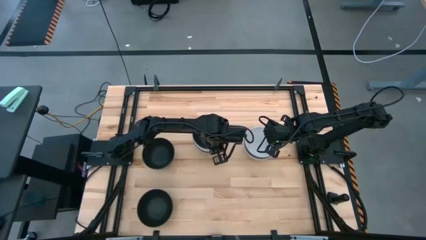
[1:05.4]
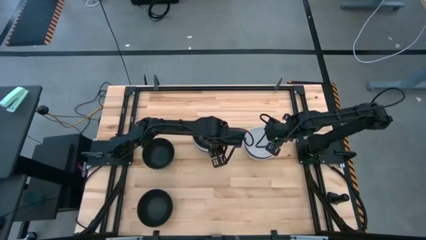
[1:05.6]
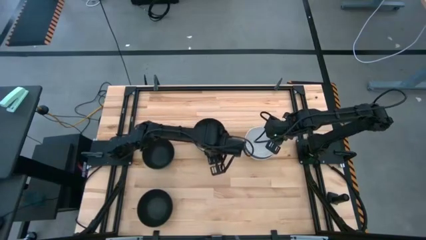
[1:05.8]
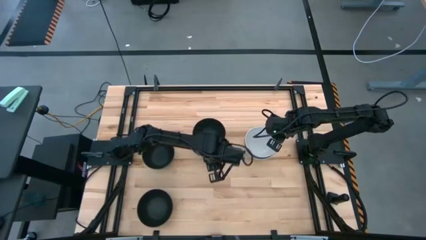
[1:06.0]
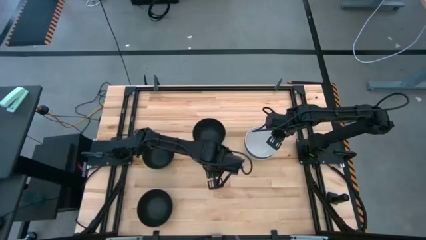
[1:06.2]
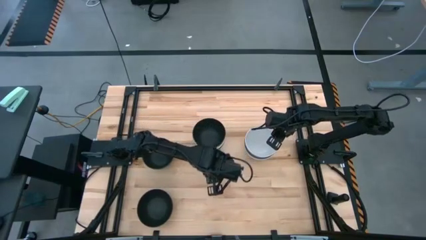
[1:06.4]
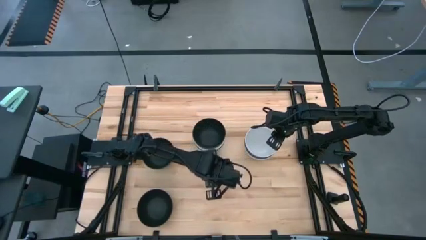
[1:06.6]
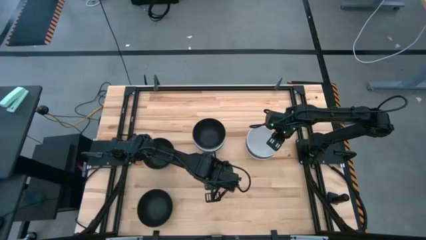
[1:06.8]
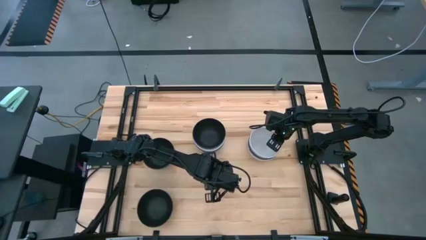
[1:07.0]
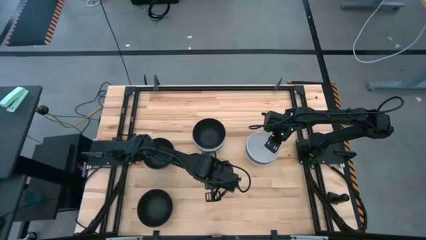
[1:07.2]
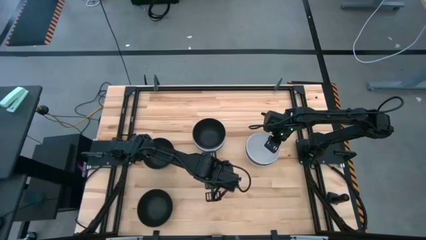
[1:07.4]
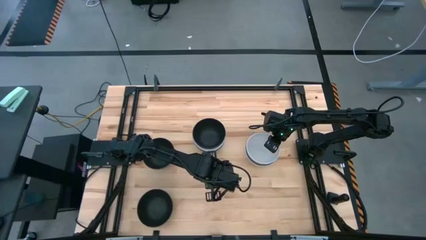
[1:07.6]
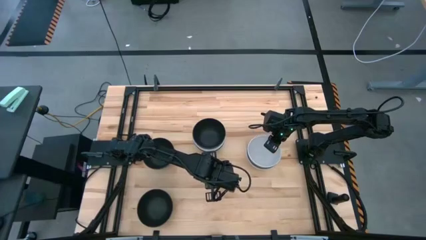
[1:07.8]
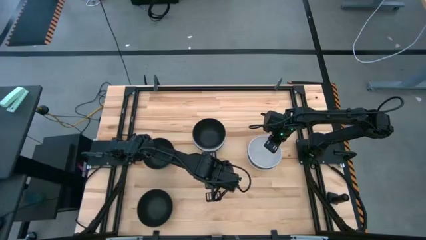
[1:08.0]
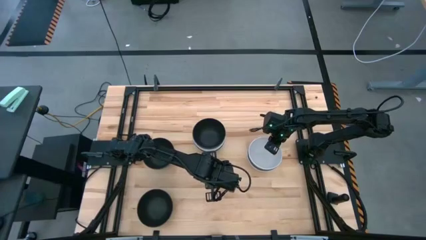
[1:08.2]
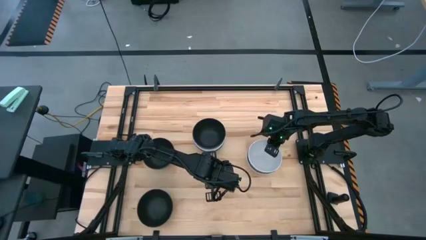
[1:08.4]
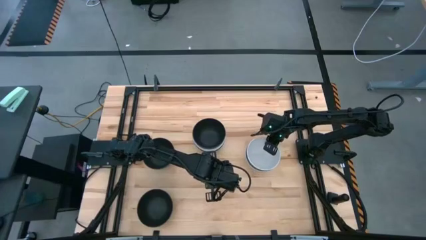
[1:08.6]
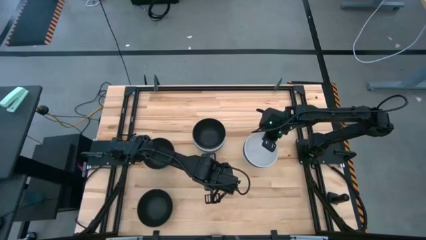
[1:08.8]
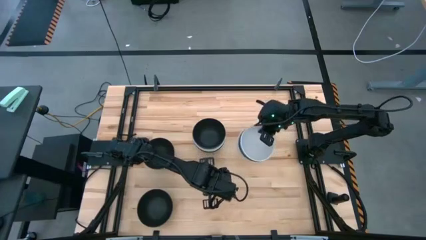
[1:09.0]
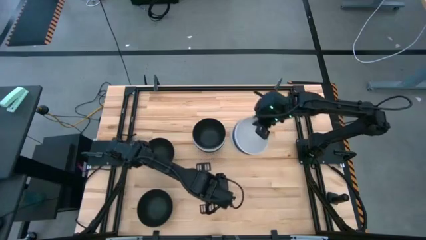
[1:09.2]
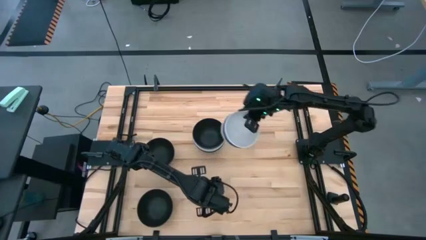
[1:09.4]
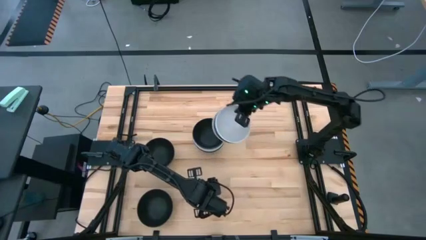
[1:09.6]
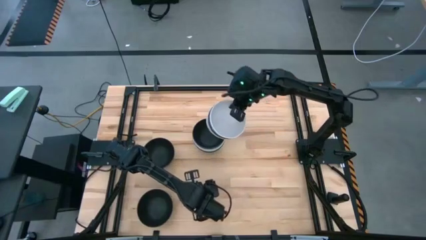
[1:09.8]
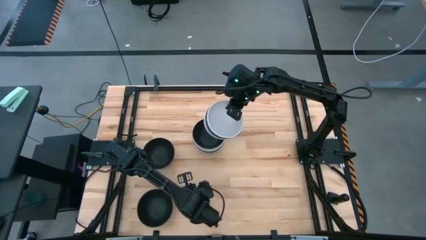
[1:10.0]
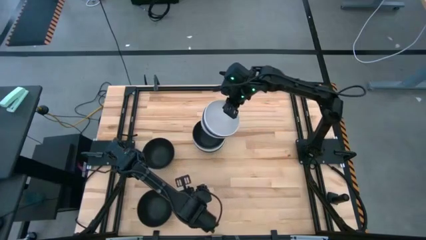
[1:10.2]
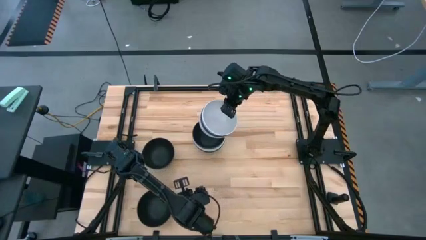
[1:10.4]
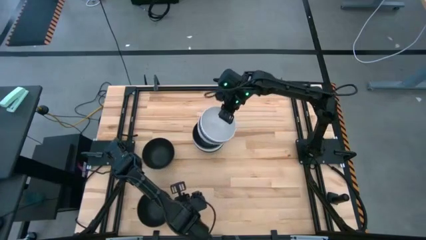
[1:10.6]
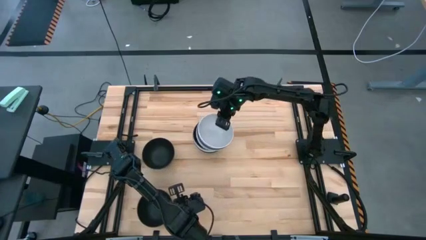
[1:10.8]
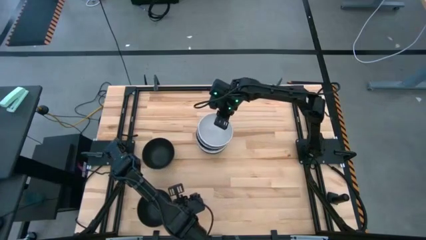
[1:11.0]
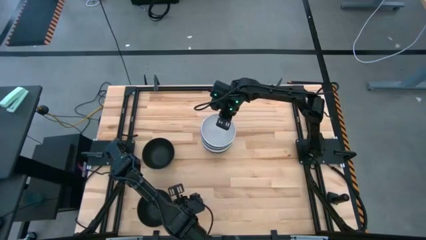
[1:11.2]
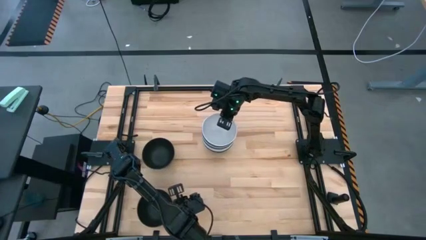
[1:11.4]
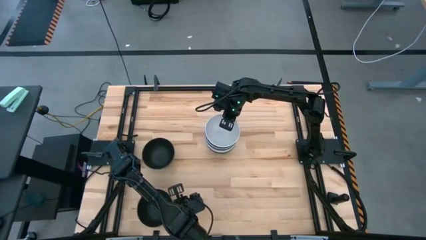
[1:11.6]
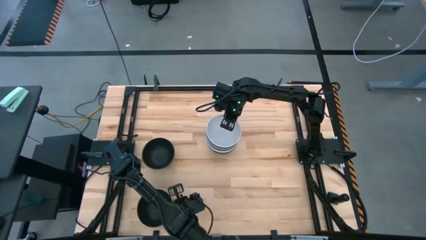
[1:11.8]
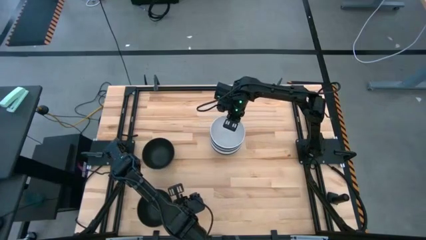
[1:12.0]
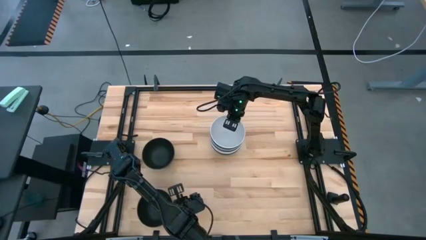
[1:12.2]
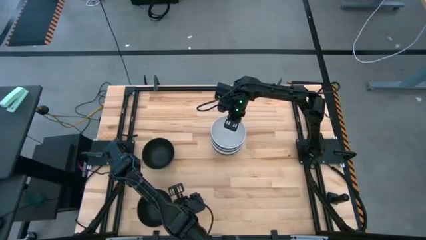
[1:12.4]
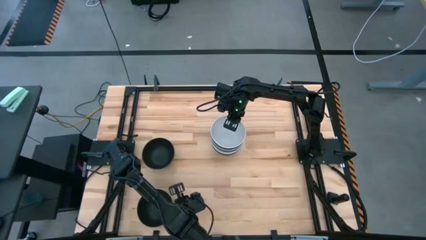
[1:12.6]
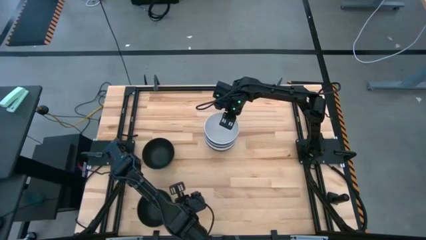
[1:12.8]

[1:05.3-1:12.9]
Task: Nest bowls inside each other
Stack the white stacked bowls on top of the black stacked bowls

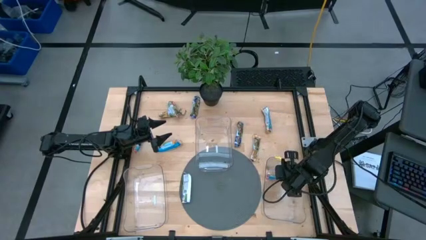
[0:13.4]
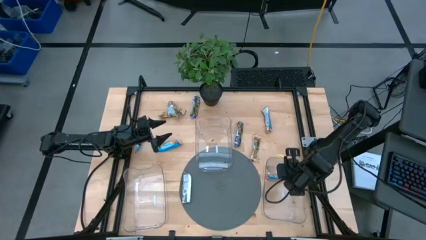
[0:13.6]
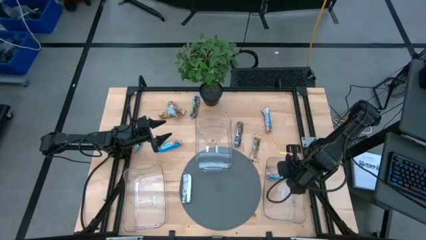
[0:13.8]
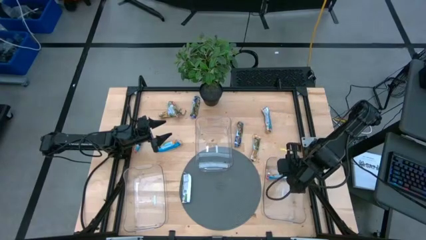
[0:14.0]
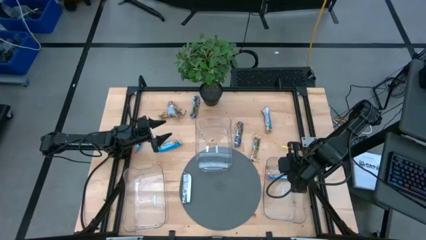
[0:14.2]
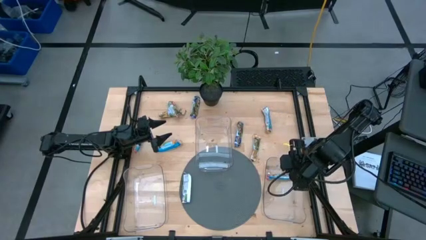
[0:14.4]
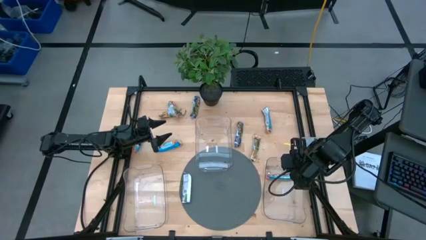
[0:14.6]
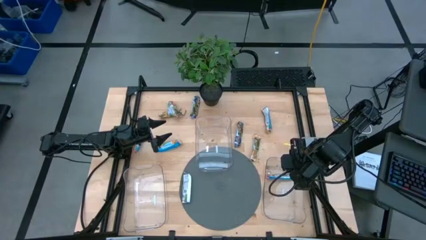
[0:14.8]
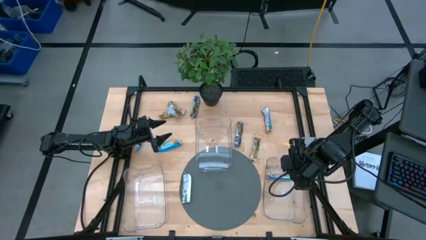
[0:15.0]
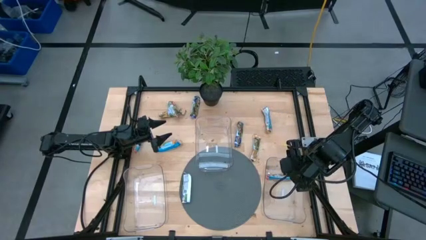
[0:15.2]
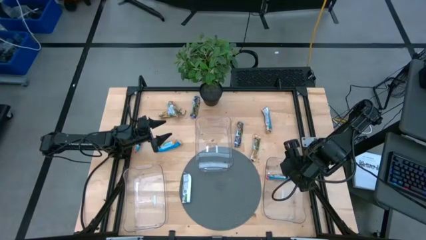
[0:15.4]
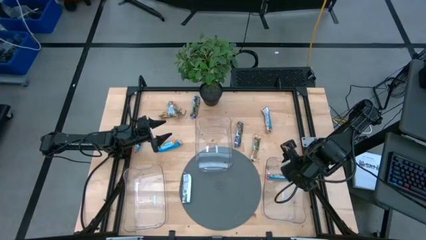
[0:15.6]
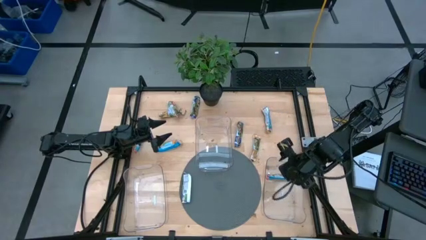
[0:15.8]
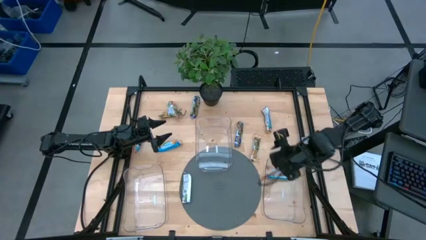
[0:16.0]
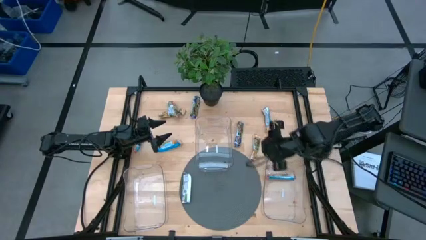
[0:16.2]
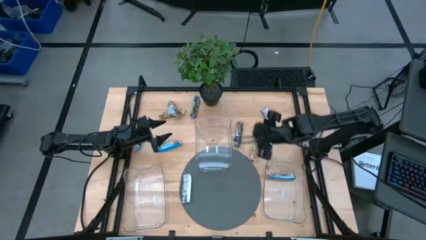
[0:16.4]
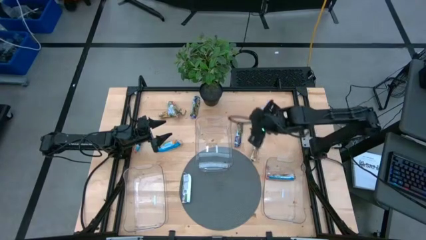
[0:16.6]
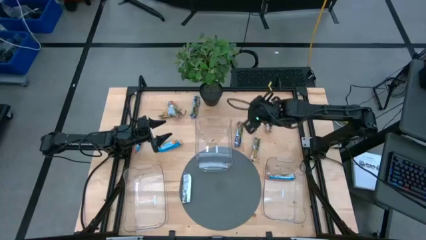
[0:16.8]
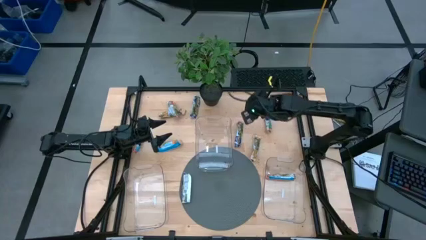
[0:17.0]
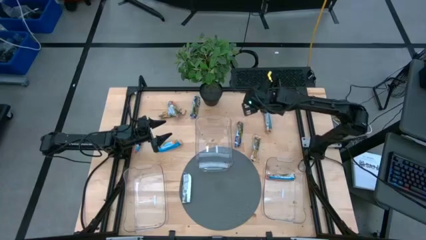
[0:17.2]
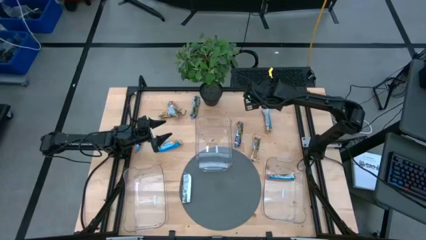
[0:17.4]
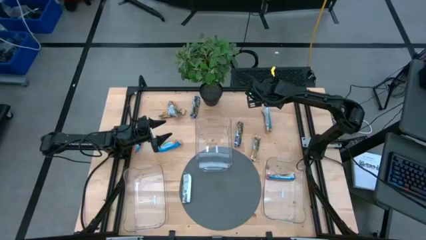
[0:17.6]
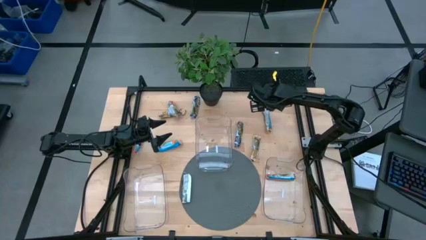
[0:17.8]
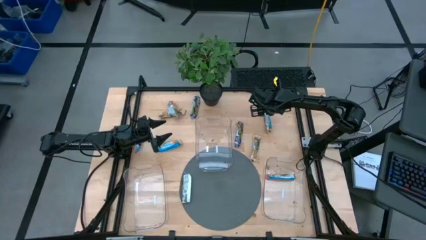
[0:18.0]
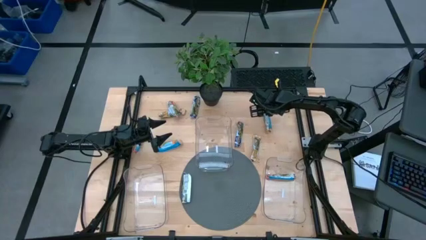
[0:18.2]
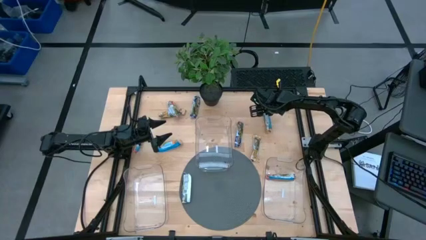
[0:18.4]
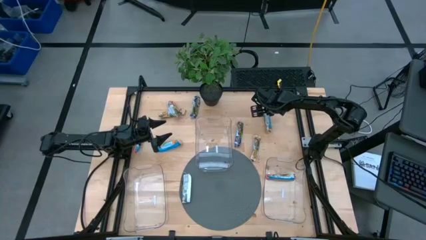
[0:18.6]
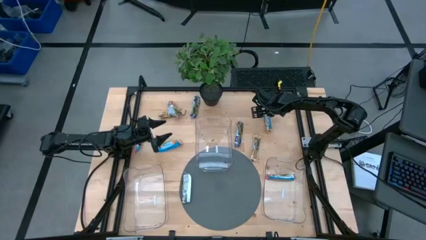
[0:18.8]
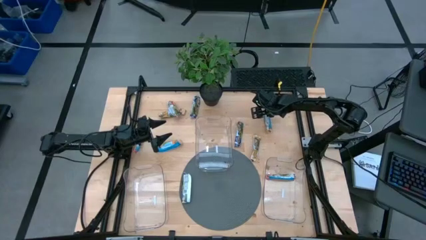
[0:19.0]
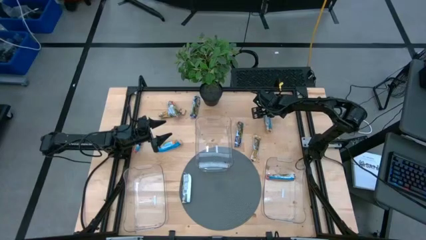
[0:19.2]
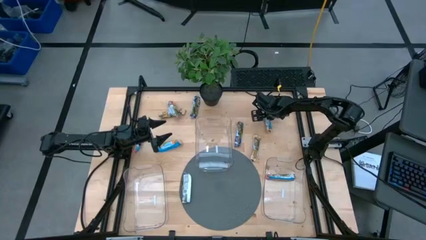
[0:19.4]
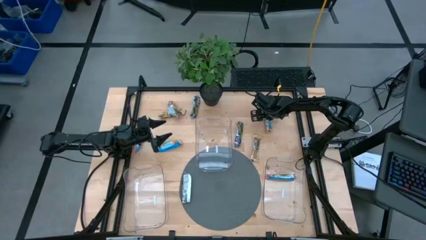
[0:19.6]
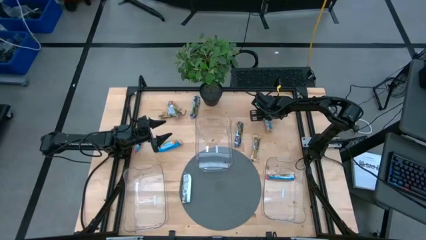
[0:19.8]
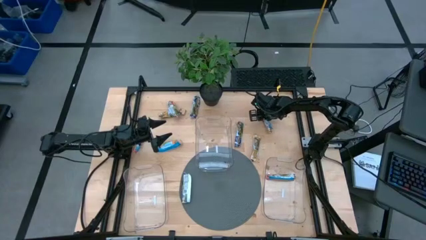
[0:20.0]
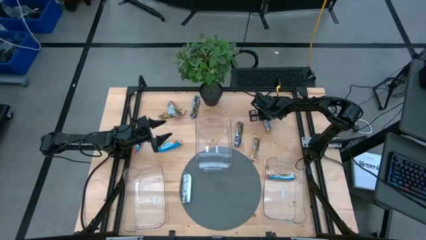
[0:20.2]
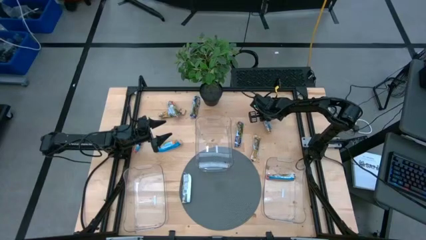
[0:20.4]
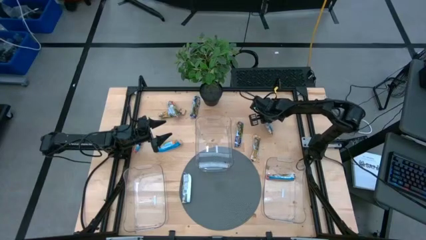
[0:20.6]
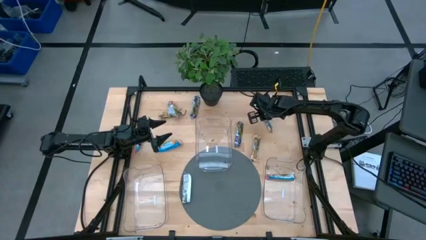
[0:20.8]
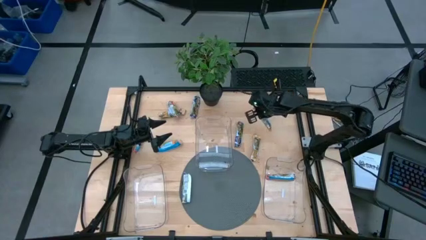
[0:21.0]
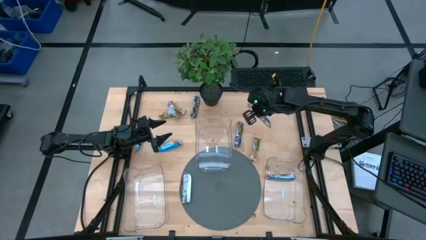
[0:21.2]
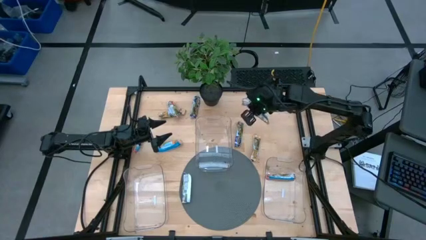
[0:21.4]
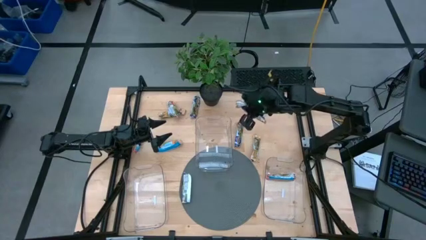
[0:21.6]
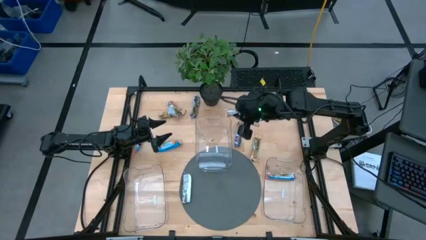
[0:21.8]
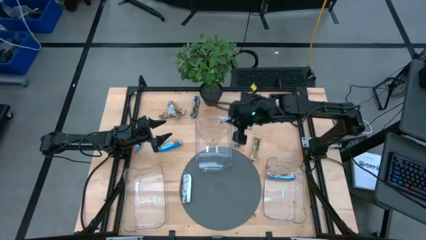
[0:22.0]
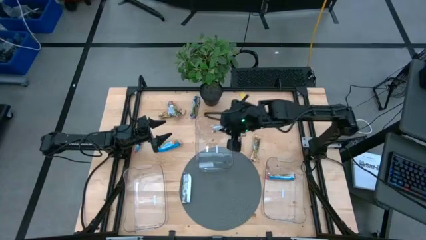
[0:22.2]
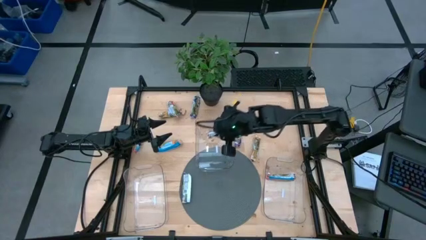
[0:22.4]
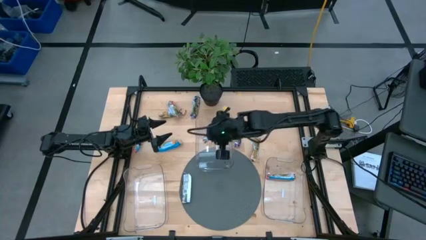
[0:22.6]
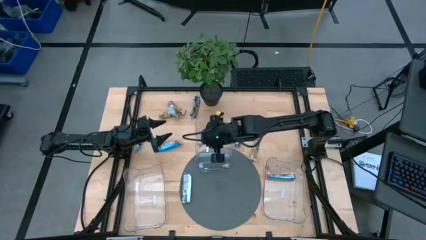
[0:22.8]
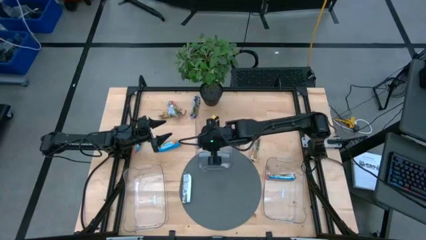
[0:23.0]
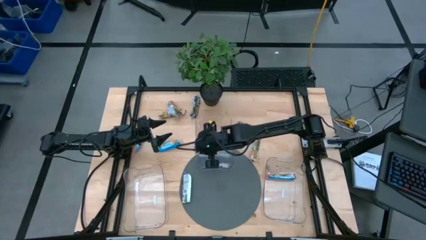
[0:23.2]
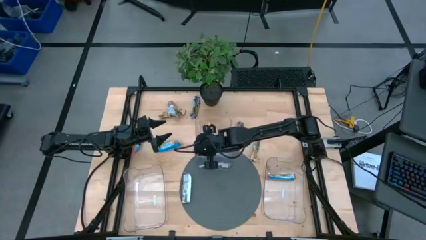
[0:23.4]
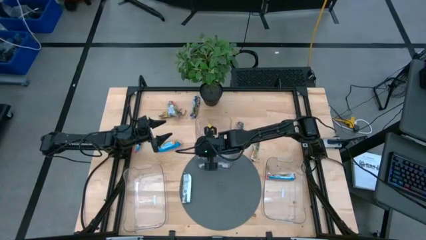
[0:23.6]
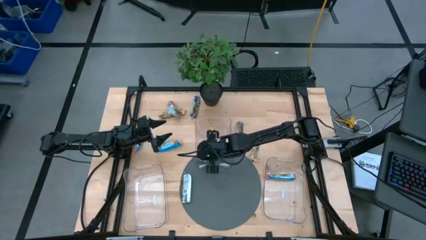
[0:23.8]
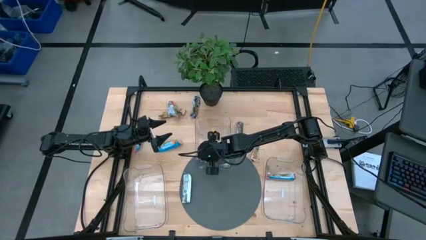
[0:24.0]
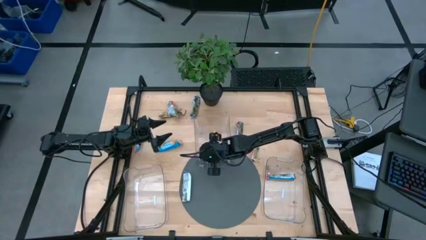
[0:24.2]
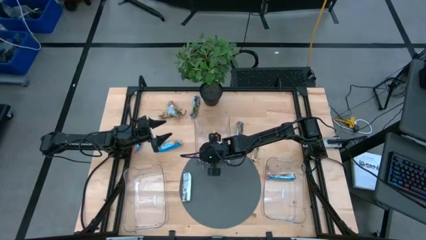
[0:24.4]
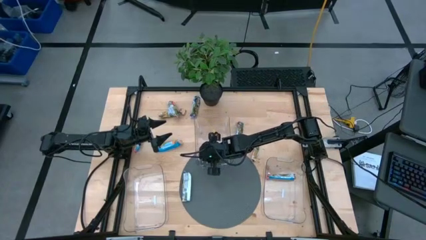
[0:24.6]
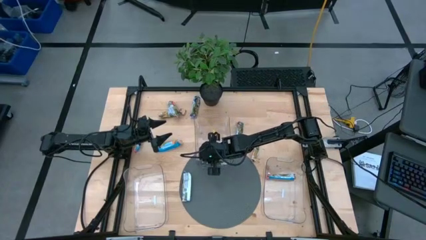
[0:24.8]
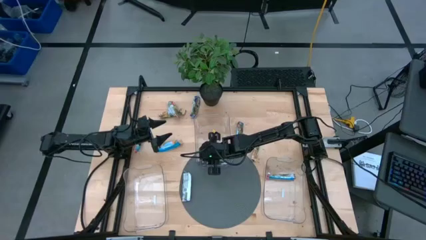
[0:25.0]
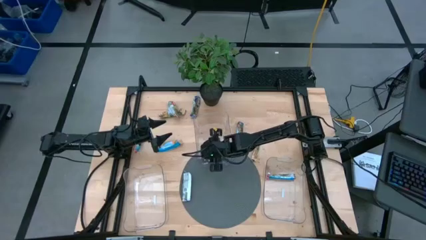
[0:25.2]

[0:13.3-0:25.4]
Task: Pick and place Granola Bars by type
Put the top right yellow granola bar into the middle transparent bin
